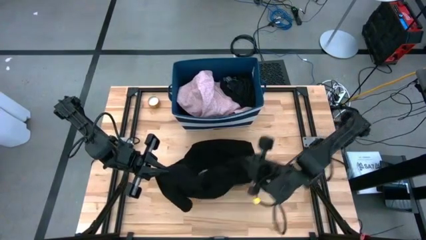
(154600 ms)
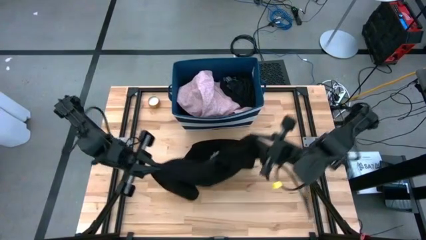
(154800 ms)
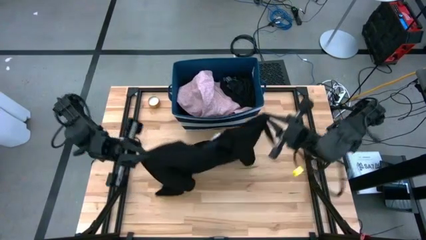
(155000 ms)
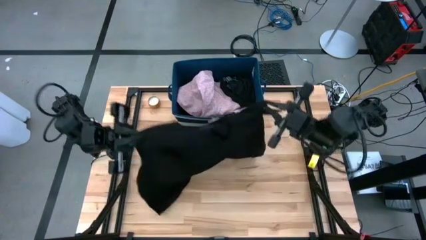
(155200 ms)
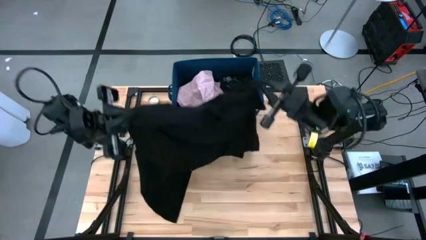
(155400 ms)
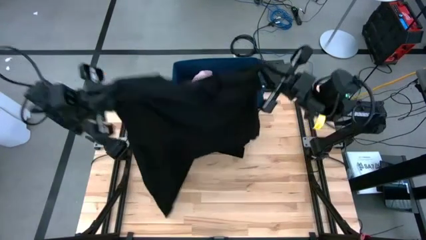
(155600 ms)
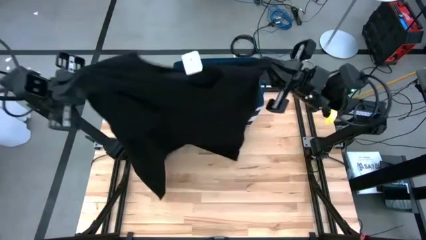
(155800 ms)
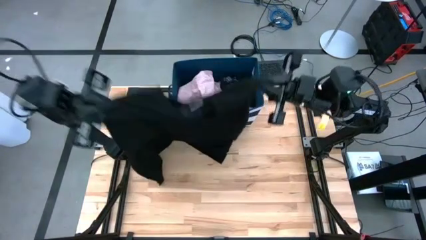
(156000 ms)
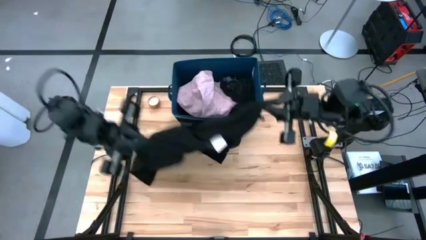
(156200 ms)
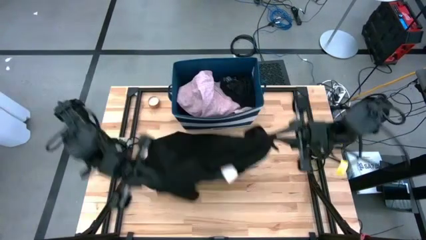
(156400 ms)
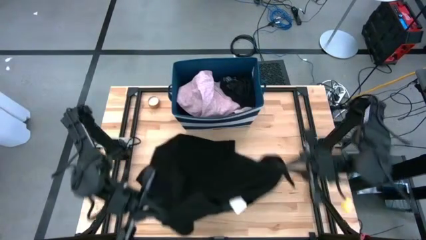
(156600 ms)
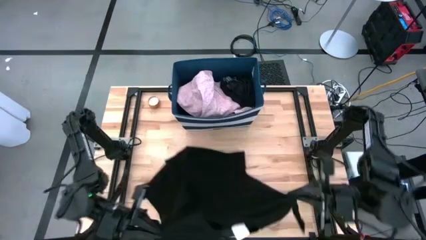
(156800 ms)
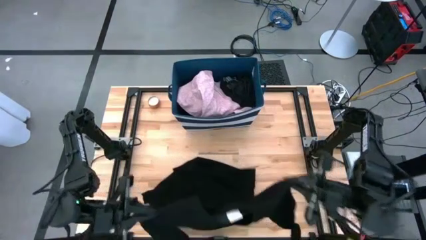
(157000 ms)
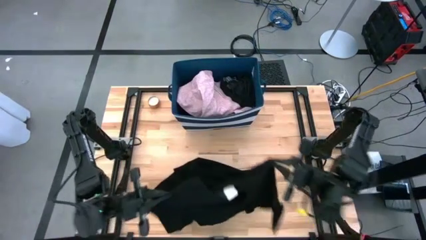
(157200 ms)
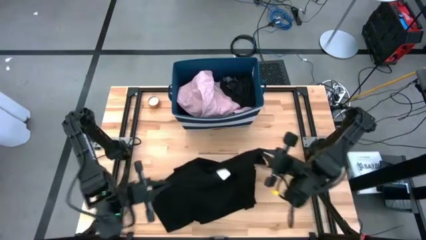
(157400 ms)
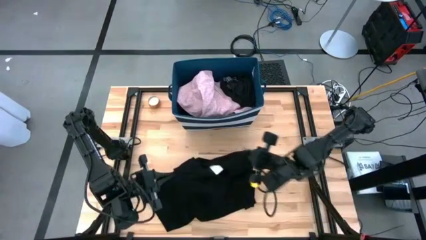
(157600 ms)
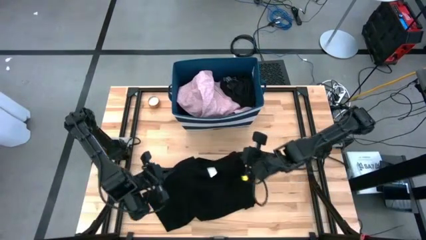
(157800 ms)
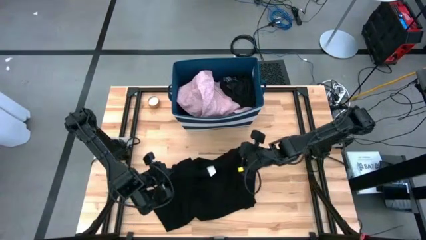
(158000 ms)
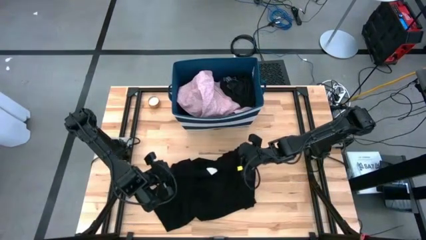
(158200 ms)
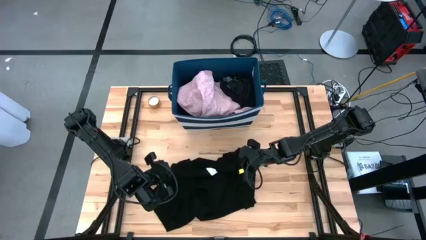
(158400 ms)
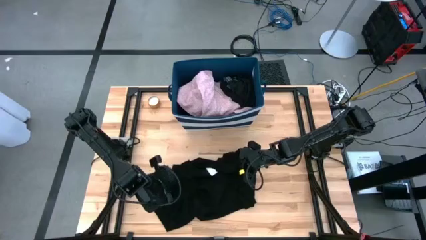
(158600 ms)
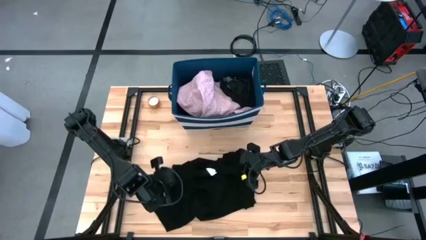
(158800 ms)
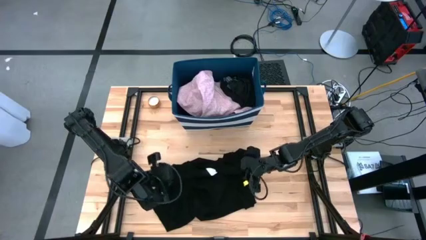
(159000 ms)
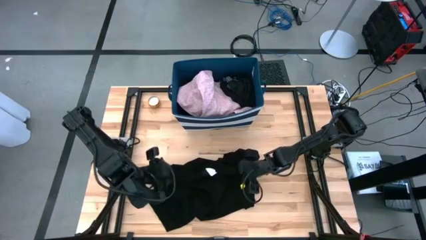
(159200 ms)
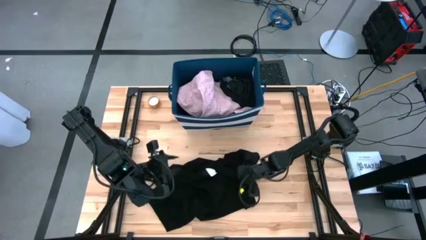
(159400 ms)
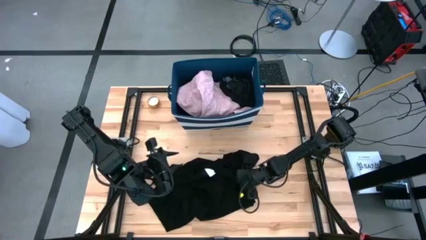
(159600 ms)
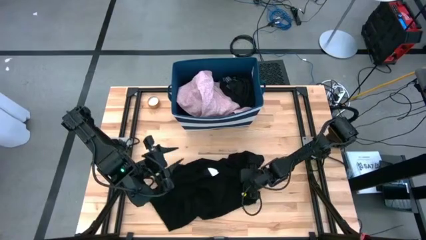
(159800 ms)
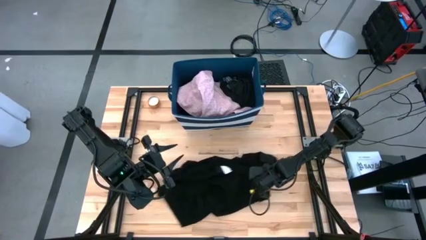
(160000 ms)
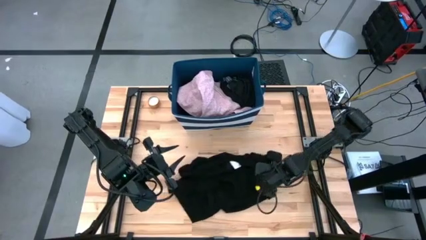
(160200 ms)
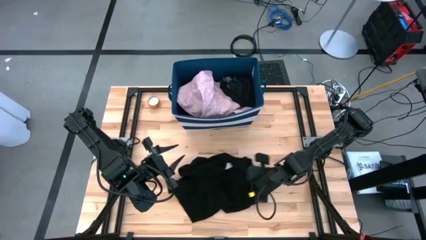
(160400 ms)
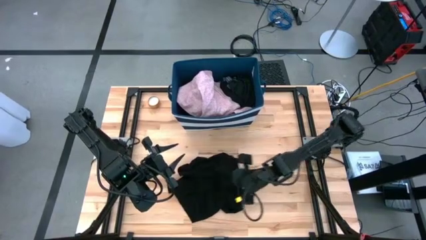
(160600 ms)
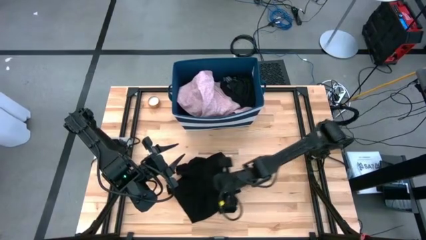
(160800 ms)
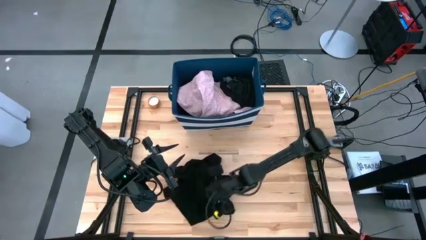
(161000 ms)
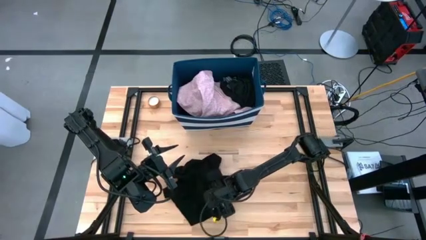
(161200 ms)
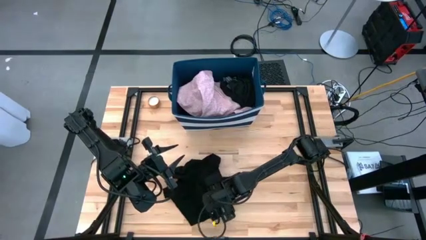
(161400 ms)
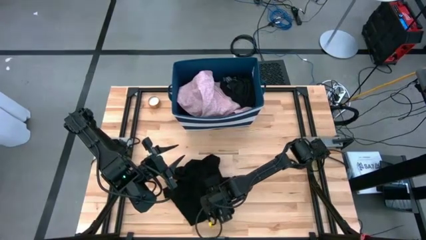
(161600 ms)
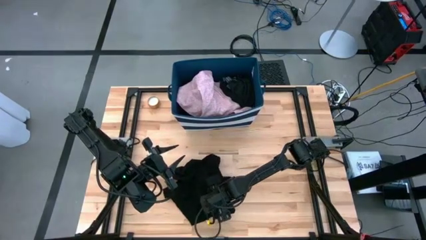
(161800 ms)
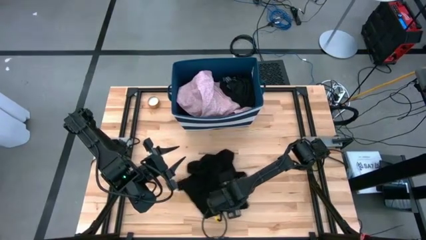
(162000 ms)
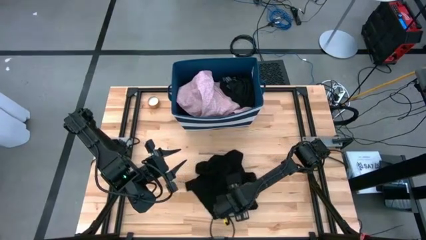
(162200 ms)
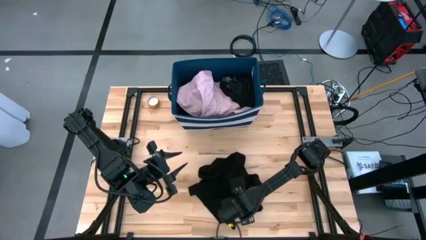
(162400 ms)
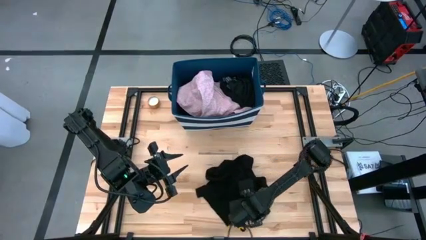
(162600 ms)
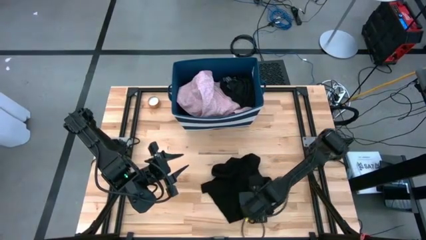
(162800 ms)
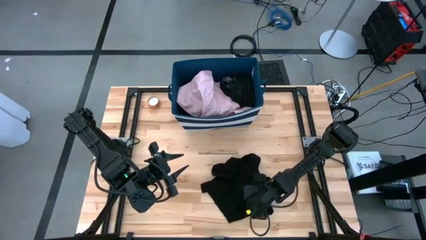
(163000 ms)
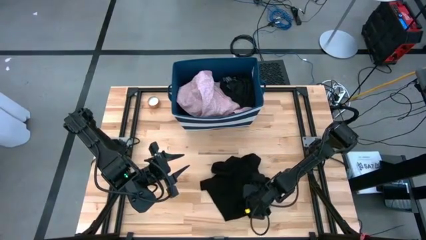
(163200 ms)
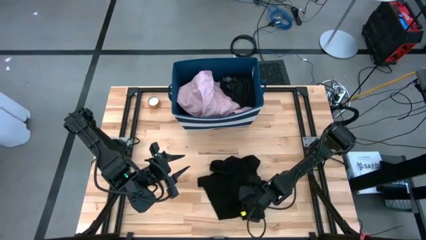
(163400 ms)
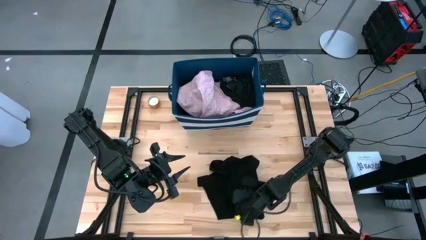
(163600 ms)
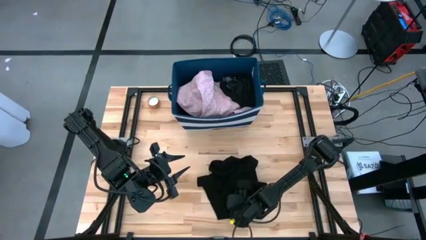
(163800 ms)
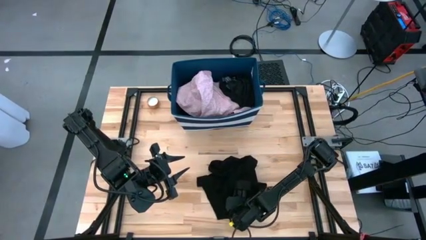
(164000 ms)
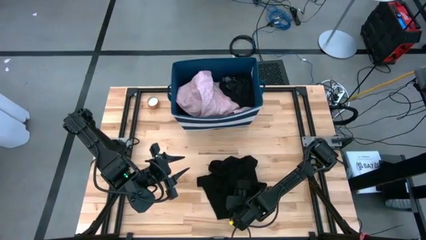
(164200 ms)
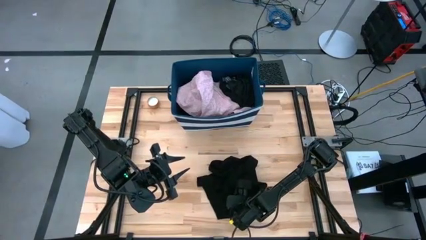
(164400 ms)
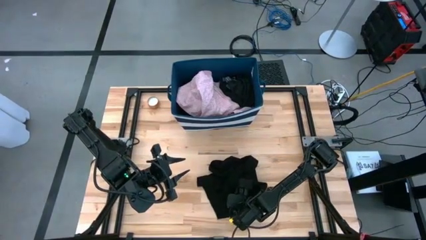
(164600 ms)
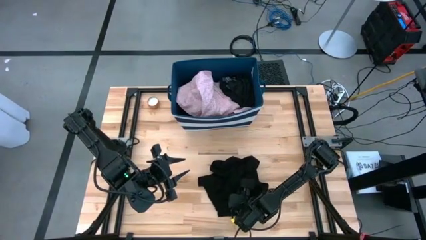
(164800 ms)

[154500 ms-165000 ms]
Task: Sort clothes
Fold the black sweatshirt

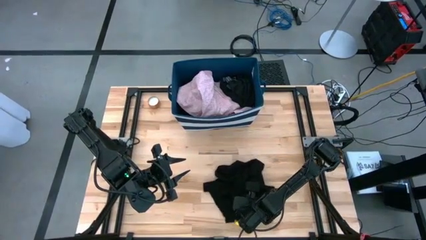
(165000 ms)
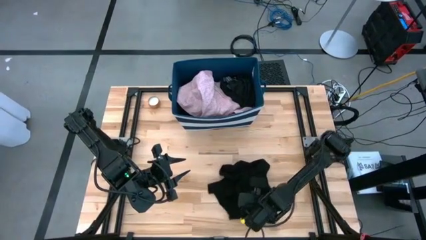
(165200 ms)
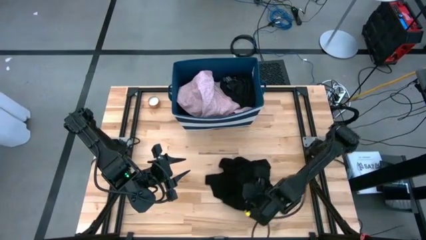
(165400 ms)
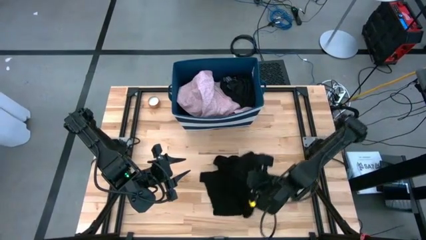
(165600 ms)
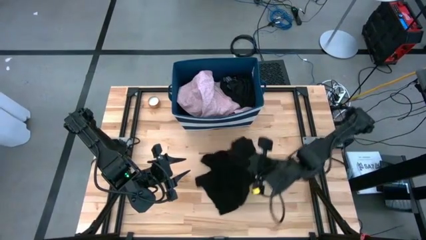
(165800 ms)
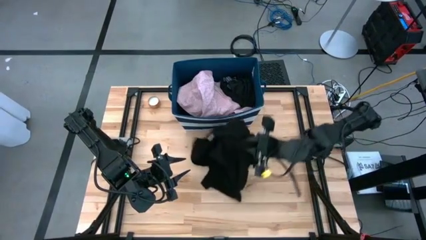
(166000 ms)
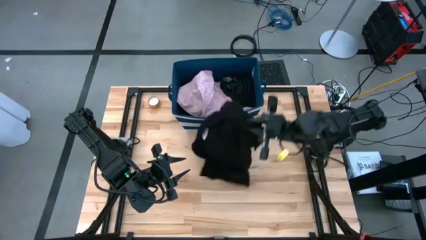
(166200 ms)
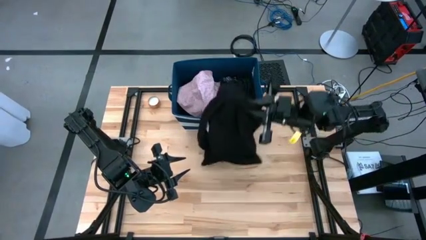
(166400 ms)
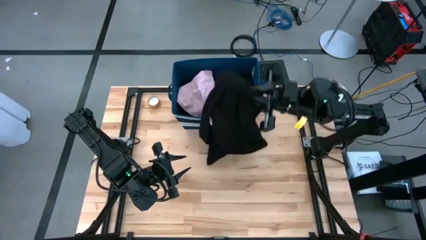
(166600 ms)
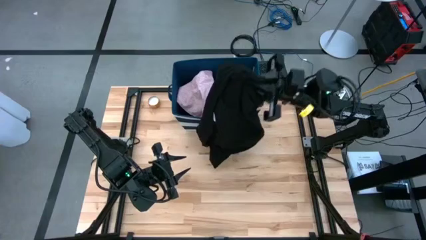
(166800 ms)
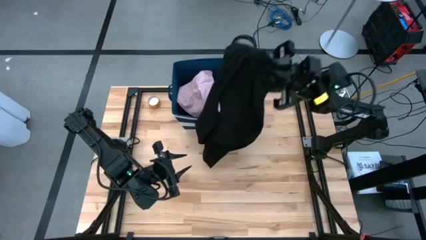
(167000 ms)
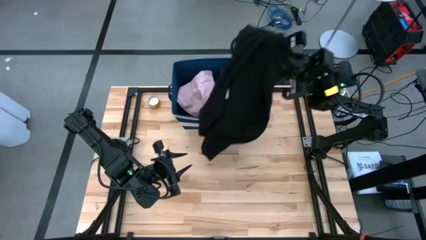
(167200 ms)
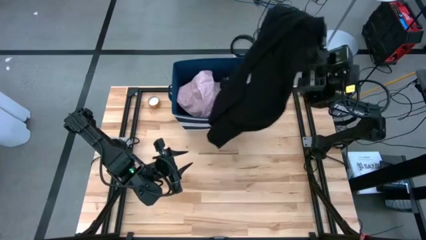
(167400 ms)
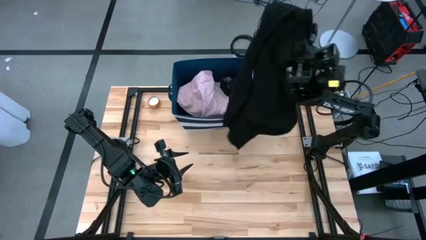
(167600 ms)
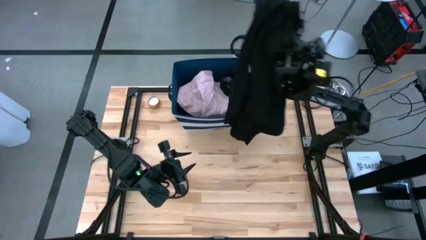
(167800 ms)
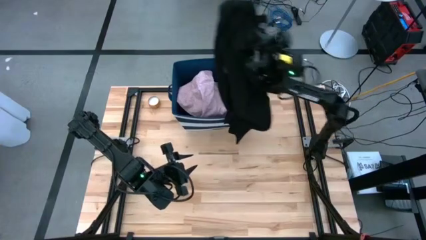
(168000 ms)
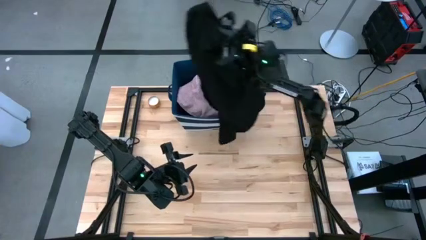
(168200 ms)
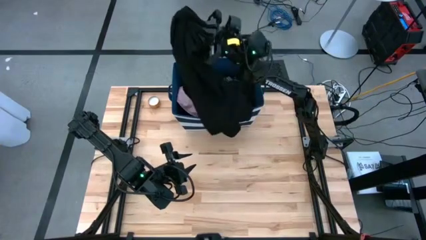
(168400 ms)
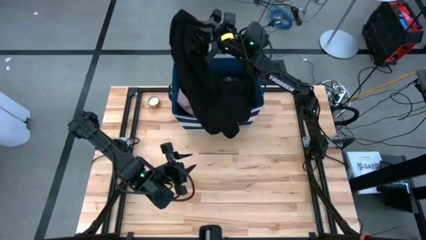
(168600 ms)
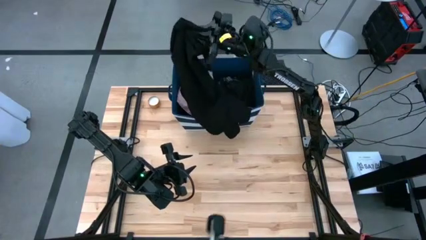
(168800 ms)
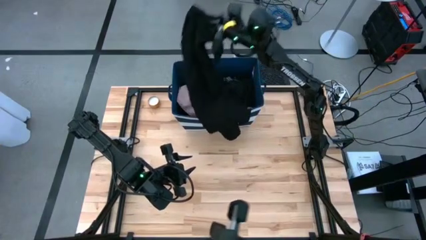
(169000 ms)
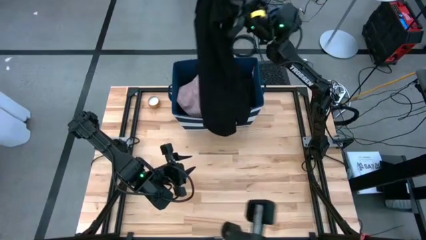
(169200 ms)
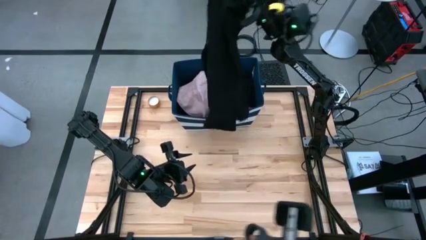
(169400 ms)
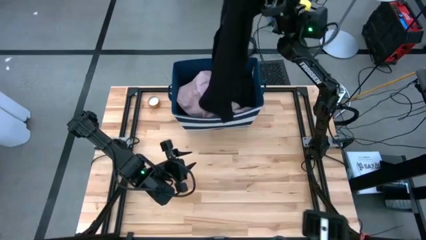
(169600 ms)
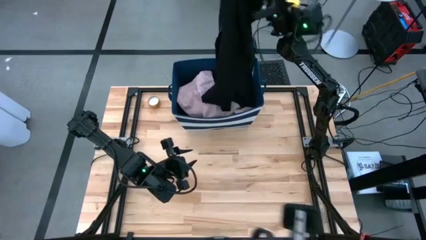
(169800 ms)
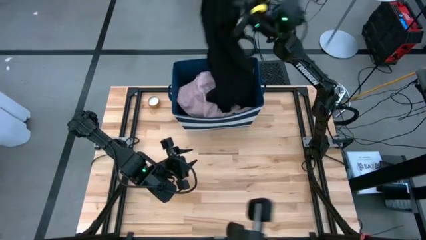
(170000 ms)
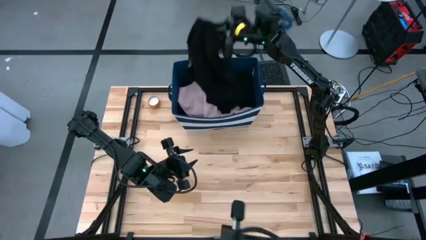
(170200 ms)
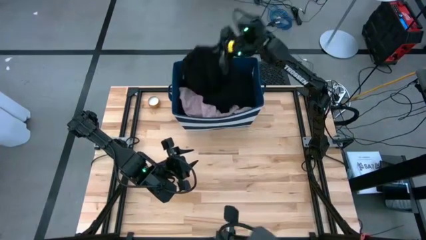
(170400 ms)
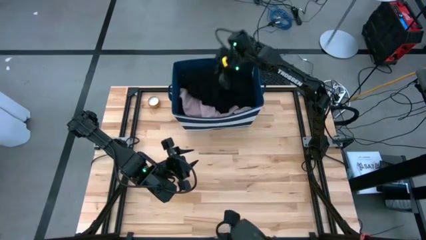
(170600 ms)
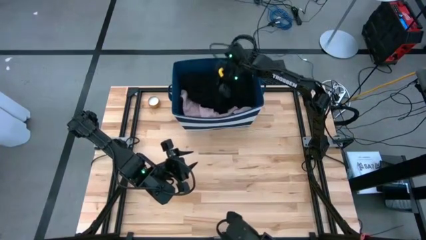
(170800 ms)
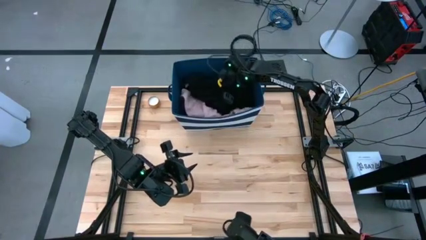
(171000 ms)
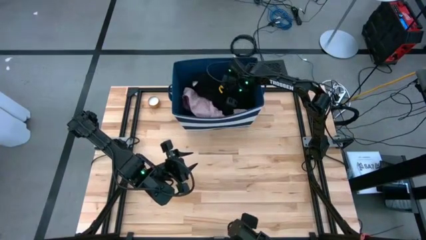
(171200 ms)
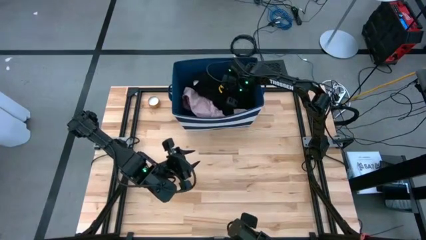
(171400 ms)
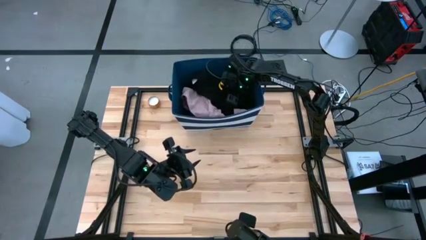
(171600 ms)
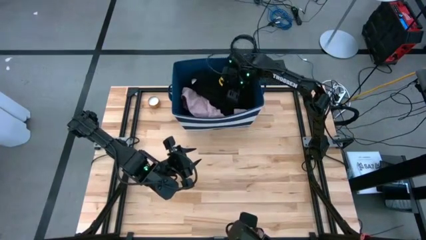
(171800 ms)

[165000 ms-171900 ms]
Put the black sweatshirt into the blue laundry bin
